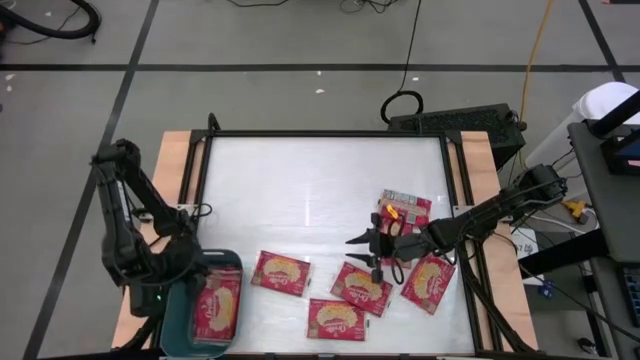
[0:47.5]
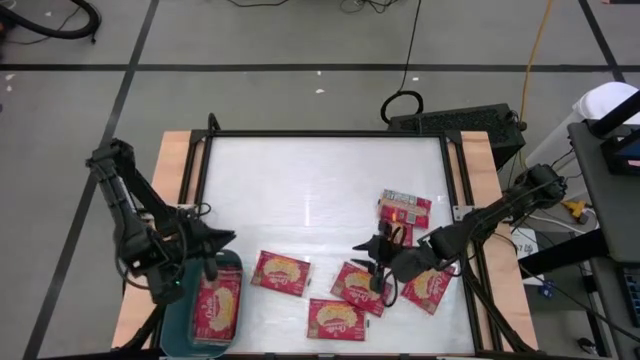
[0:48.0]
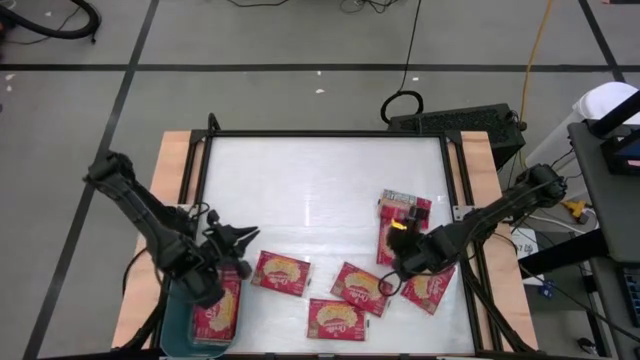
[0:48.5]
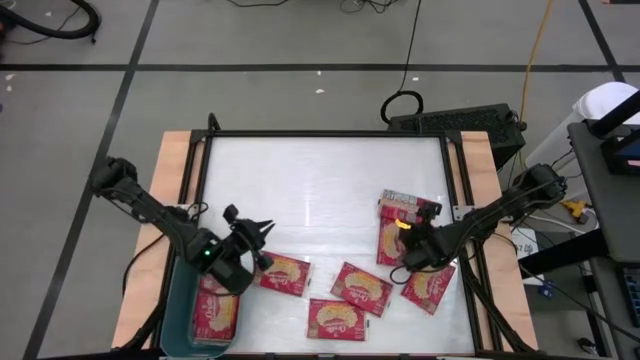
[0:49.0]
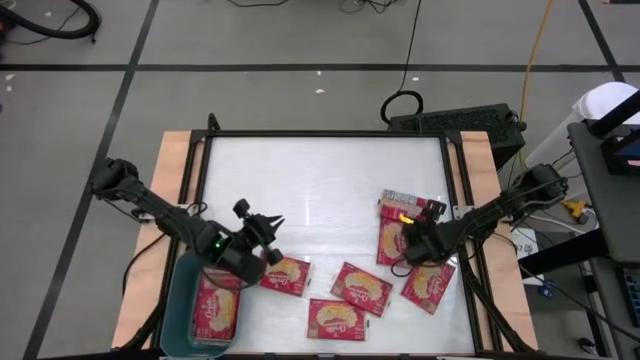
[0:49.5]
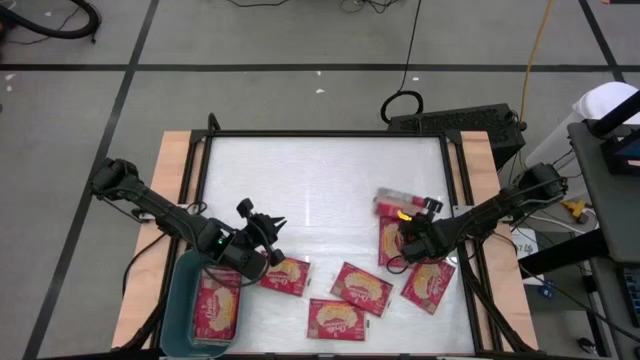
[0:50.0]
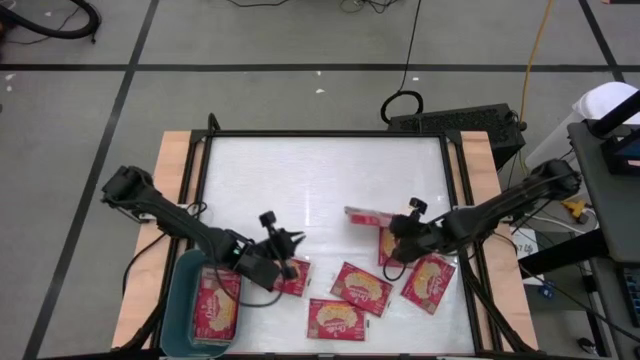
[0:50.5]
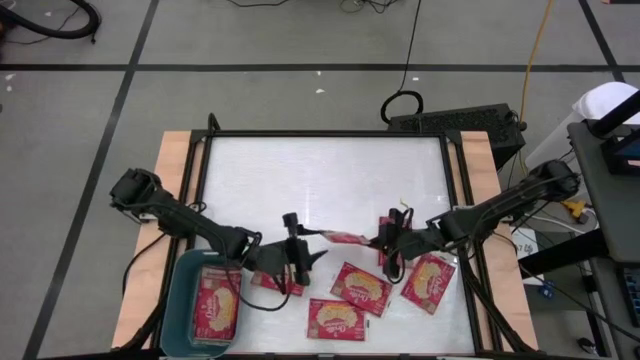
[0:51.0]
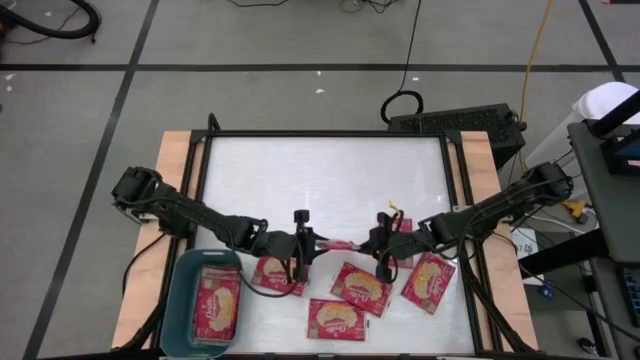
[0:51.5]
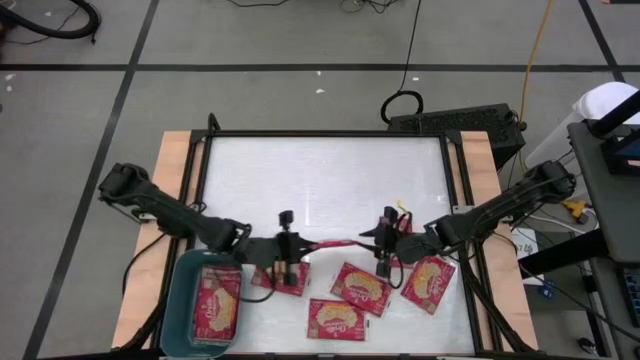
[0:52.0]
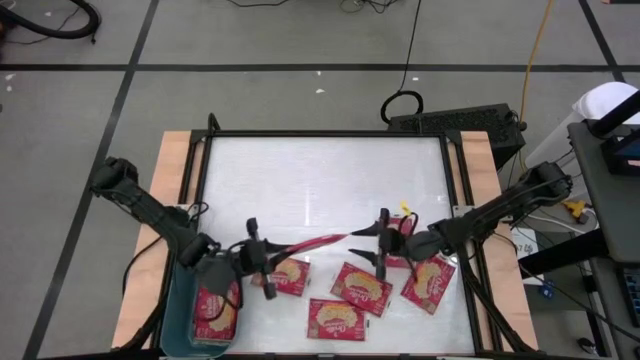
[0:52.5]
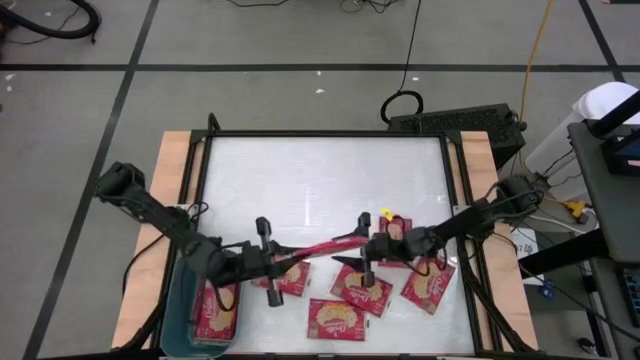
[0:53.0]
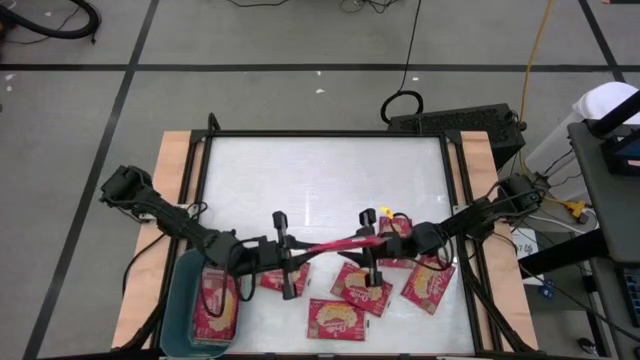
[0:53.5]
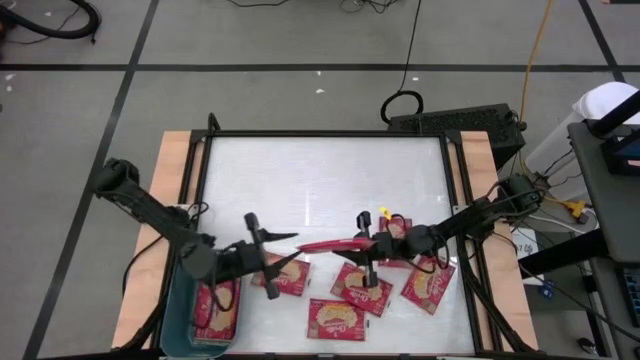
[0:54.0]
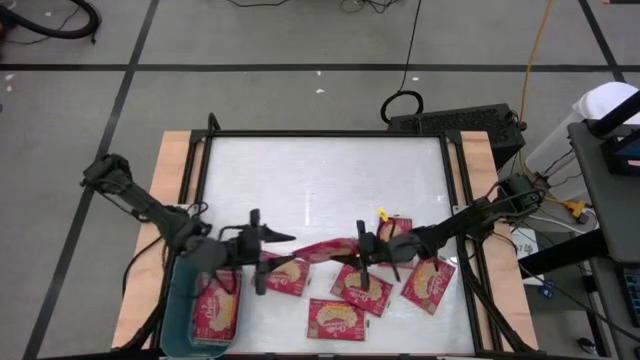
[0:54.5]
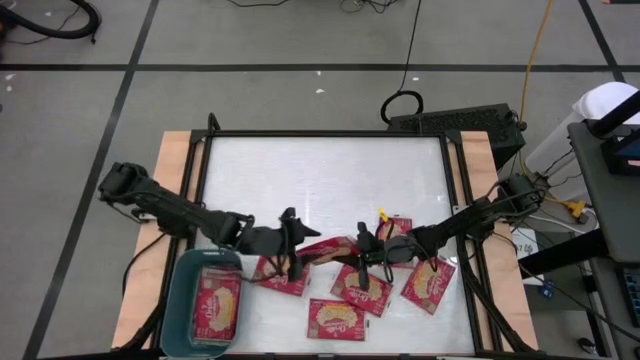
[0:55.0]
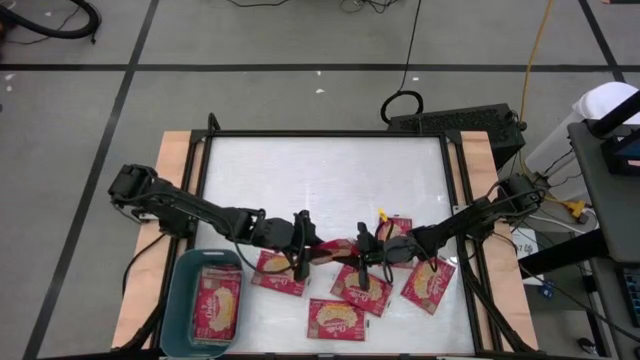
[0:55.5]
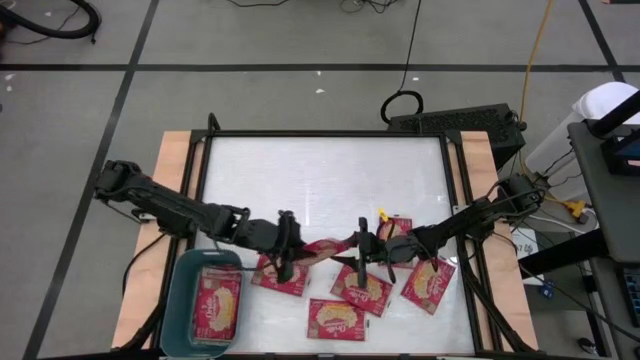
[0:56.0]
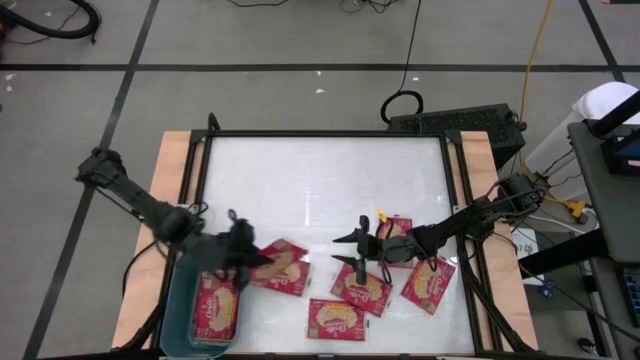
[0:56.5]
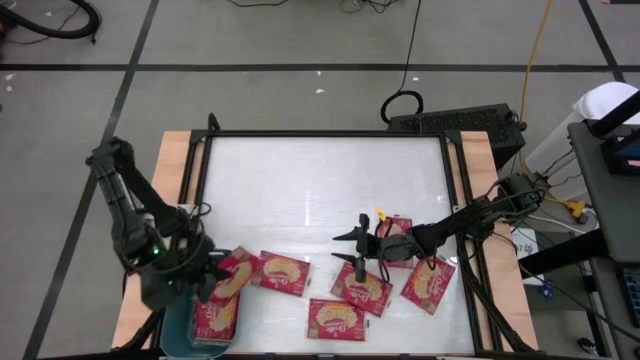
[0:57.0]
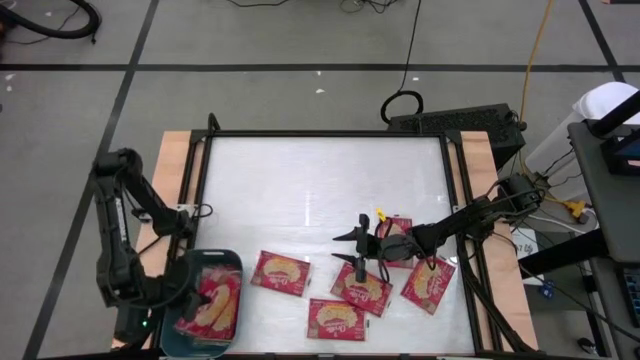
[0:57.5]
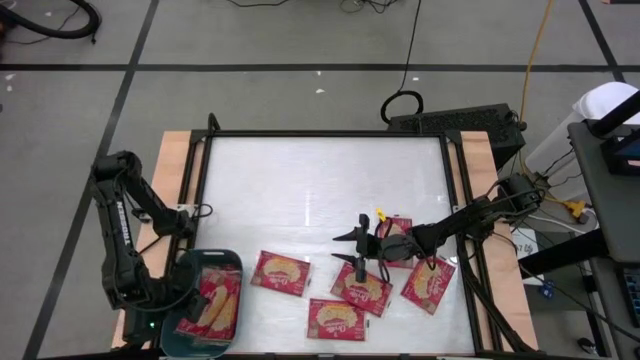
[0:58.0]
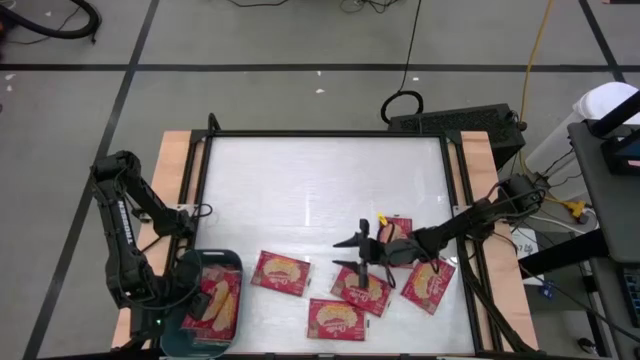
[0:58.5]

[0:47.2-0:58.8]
Task: Sort popcorn bags into baskets
Put the red popcorn bag into the blue bin

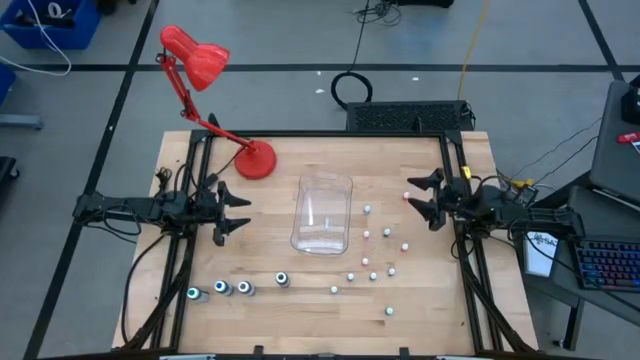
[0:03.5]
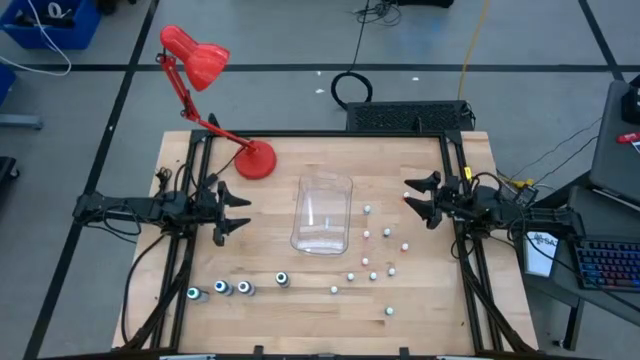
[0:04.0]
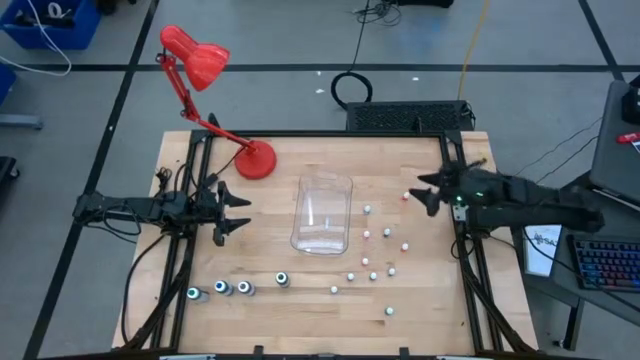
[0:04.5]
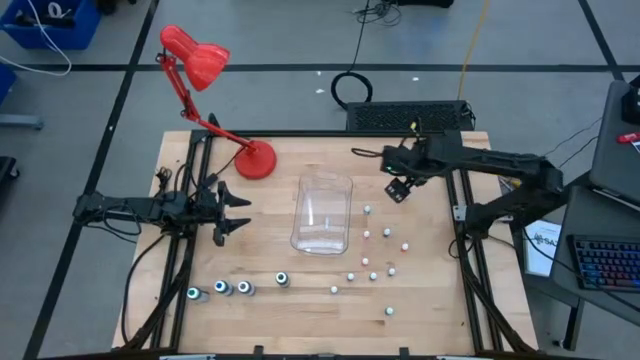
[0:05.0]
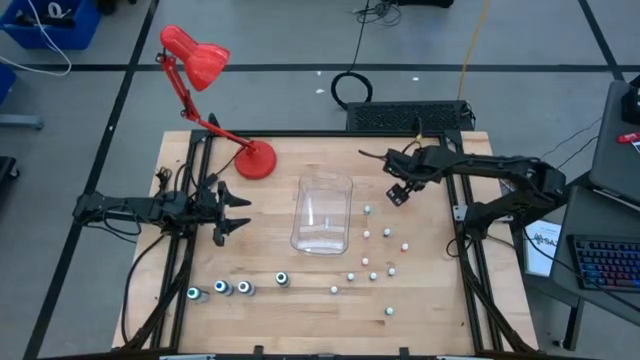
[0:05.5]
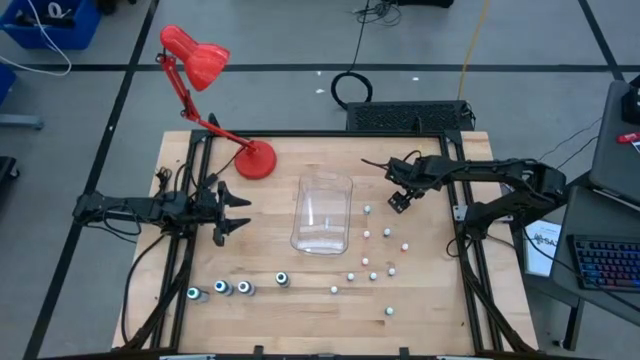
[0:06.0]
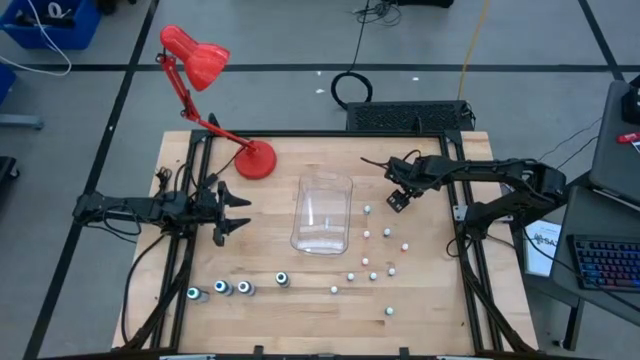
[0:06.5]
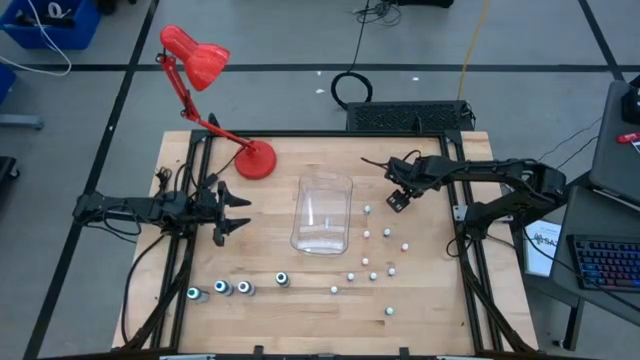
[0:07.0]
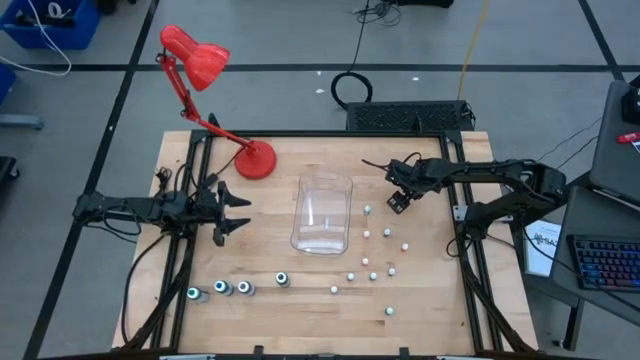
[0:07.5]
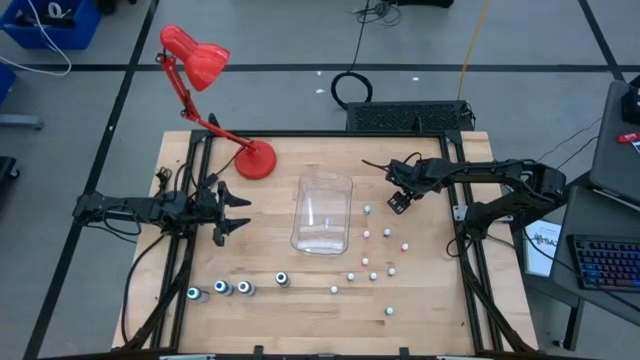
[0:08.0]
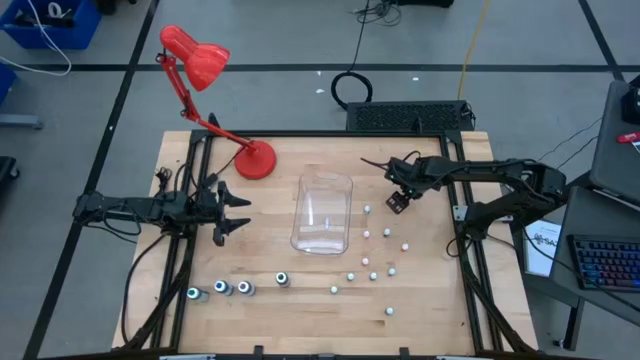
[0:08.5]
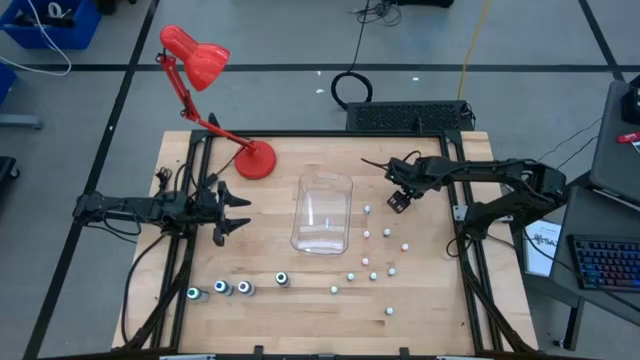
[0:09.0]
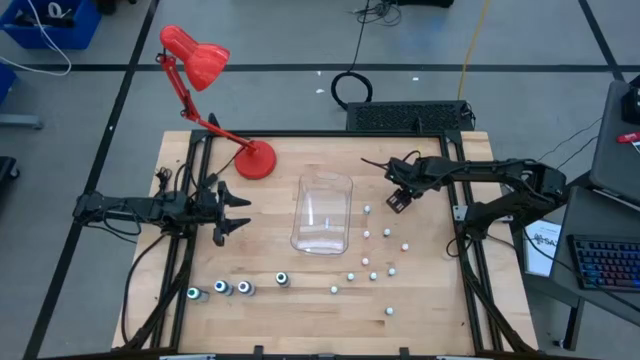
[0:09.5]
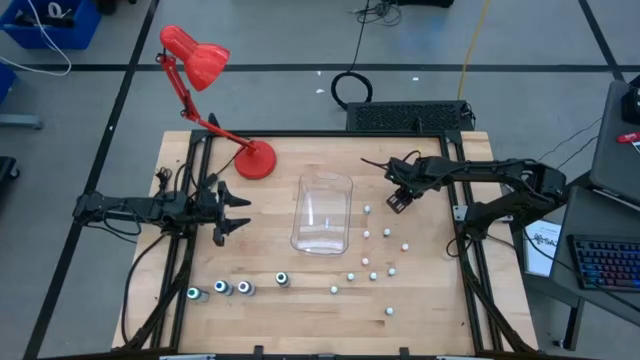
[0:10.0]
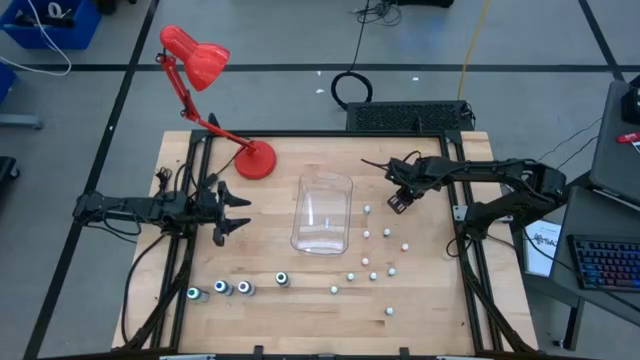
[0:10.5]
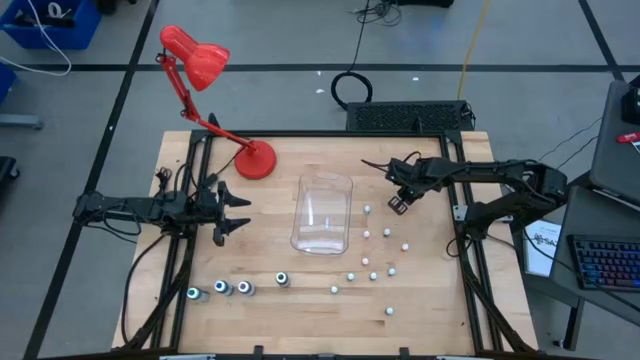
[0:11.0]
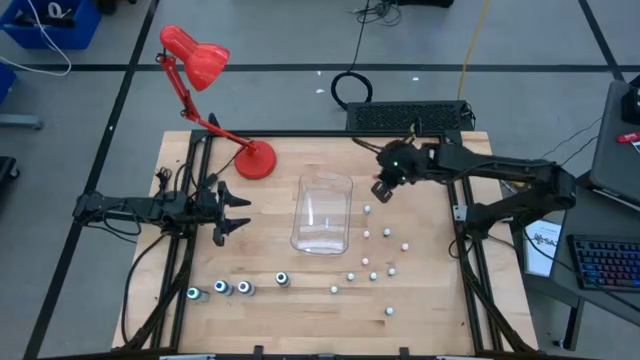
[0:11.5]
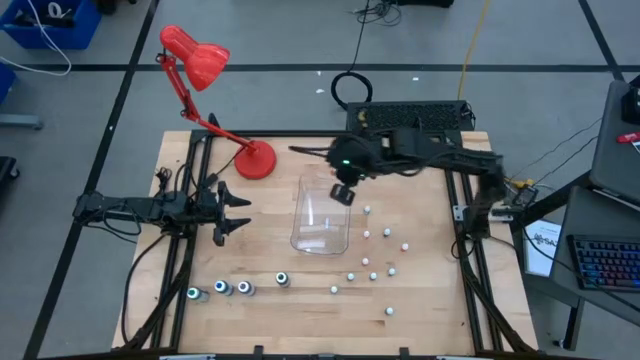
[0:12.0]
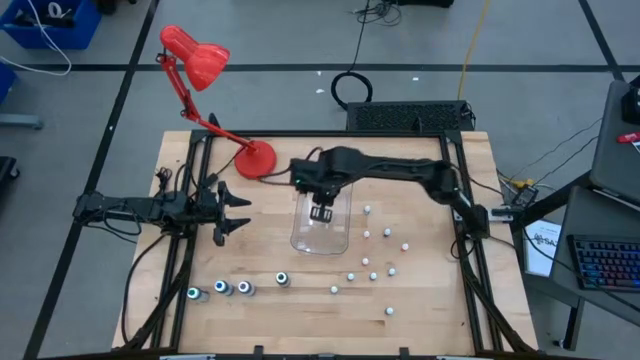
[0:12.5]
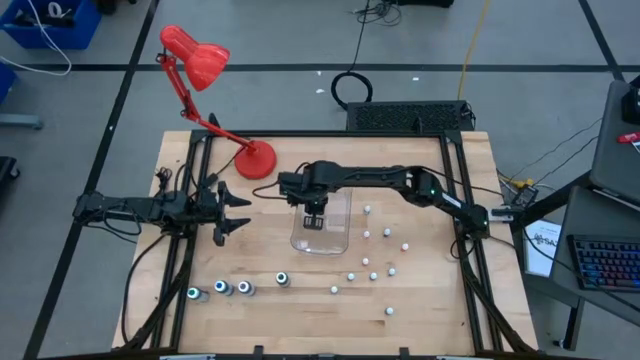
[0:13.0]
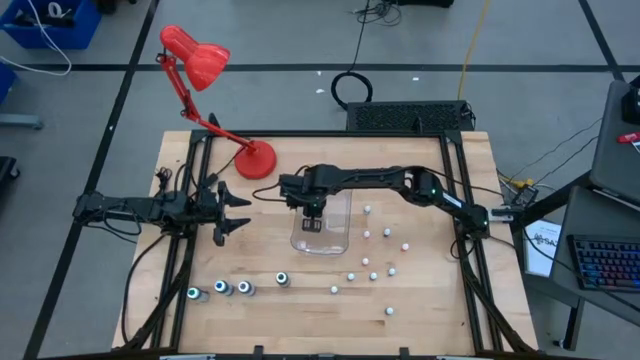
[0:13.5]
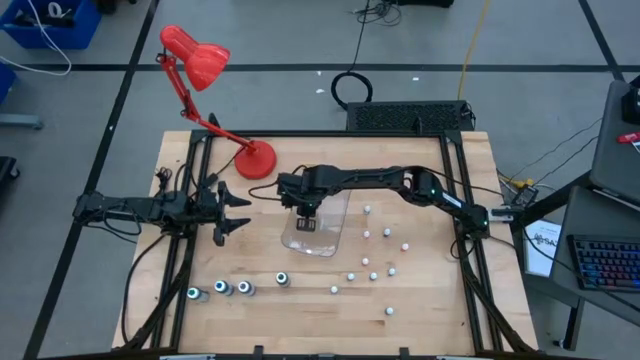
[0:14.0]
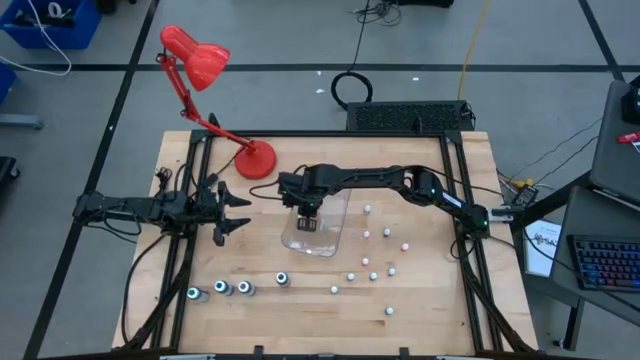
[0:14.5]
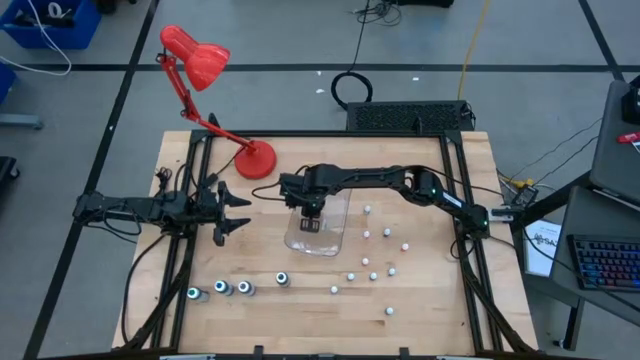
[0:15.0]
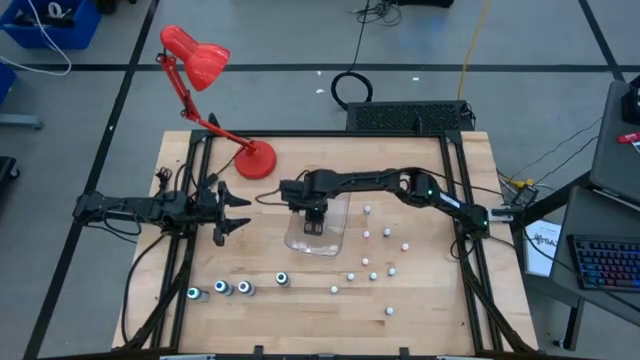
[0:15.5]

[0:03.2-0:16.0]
Task: Pick & Place food coloring
Put the small orange food coloring bottle into the transparent bin
